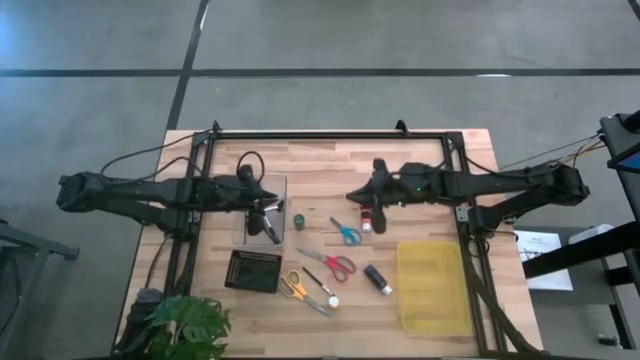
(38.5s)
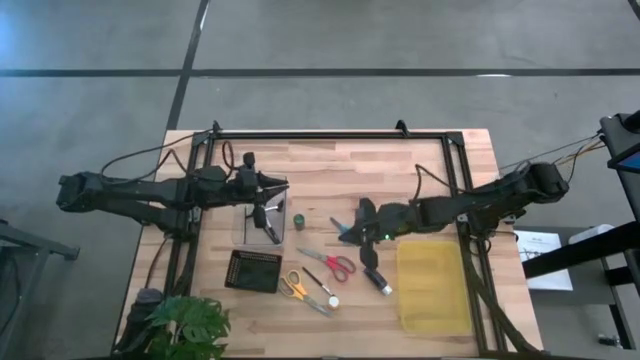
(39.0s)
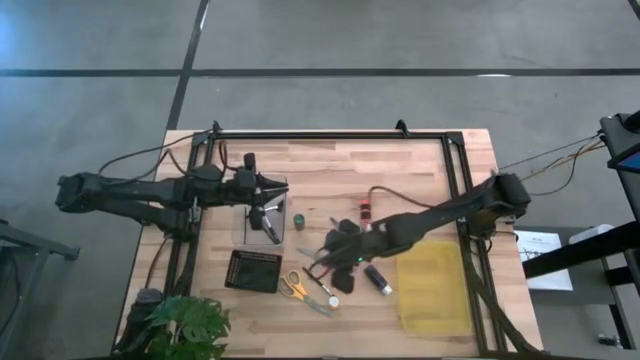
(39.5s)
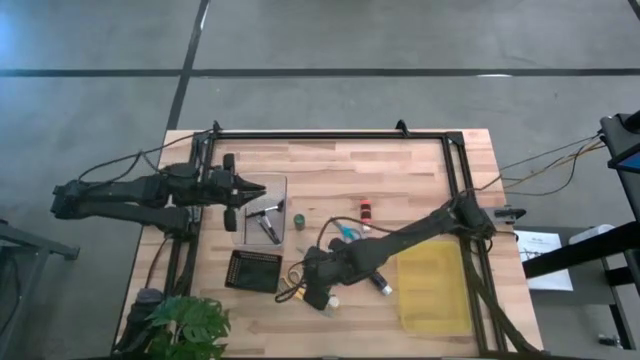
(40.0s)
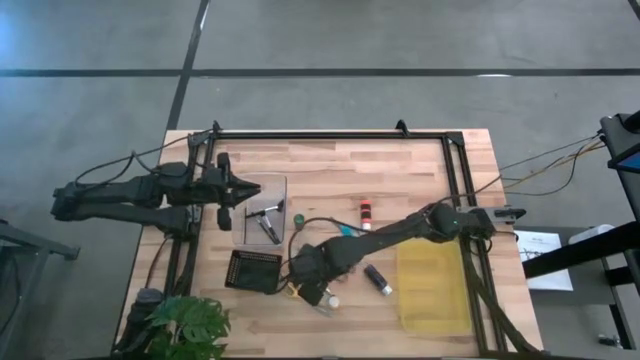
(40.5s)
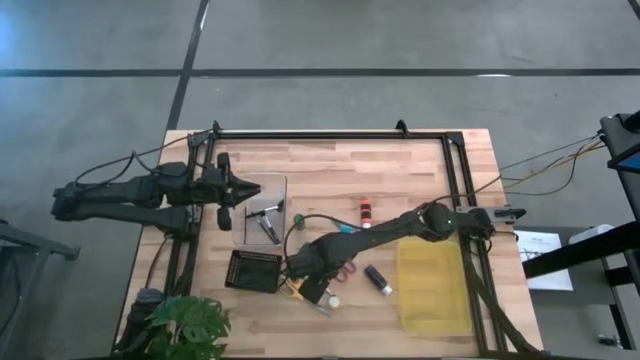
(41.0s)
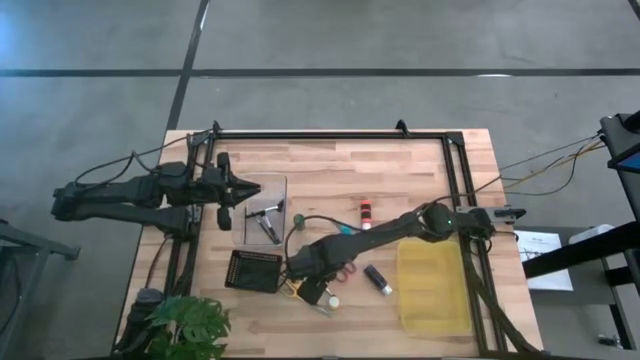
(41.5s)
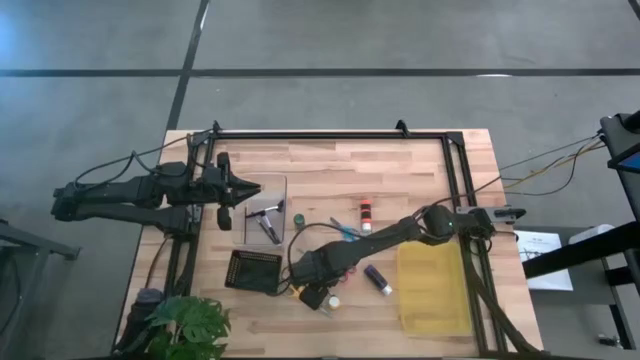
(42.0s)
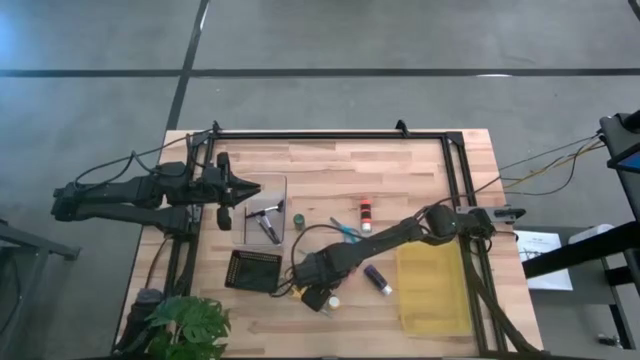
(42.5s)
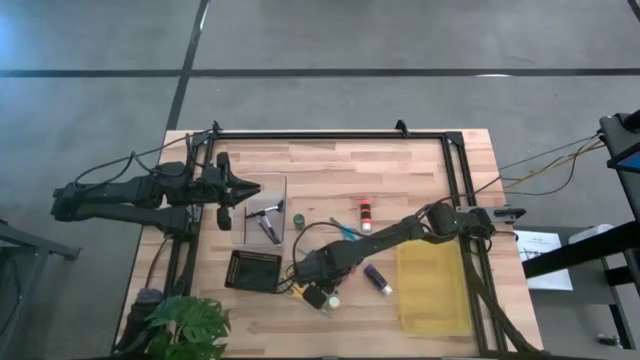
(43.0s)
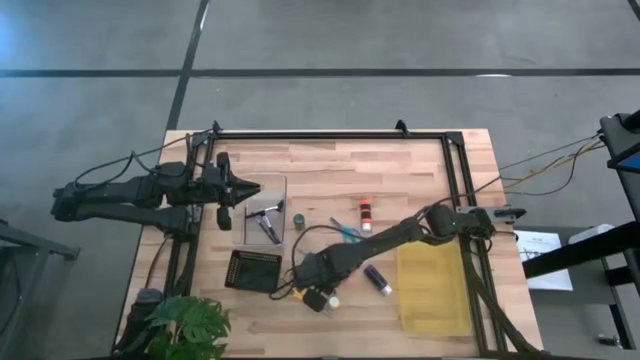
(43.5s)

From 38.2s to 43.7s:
Task: Pick & Place Paint Supplies
Put the eyeshadow brush into the transparent bin

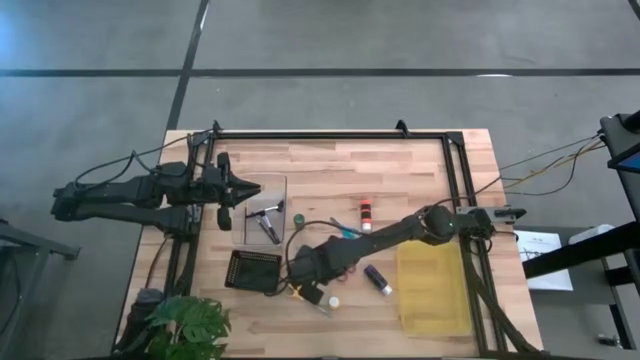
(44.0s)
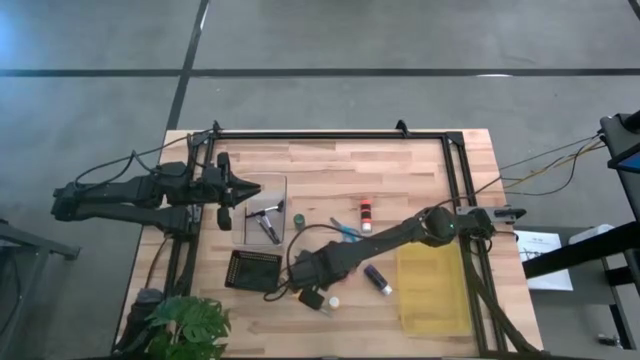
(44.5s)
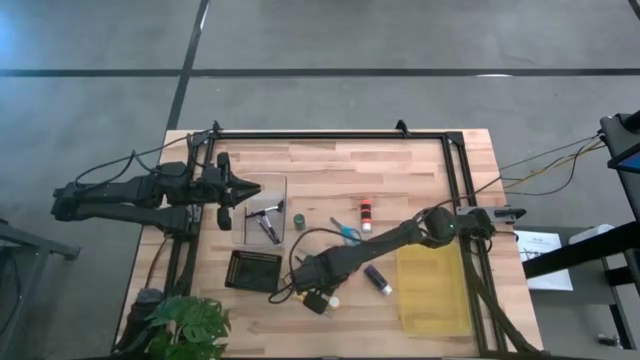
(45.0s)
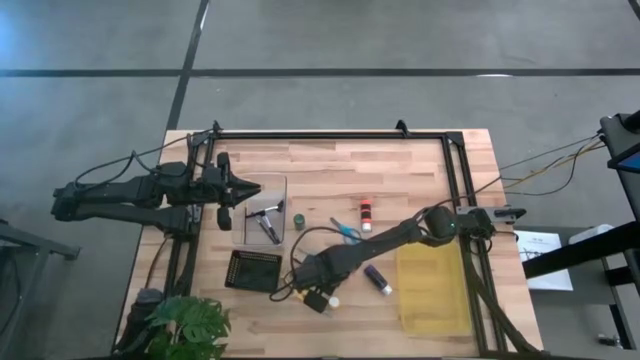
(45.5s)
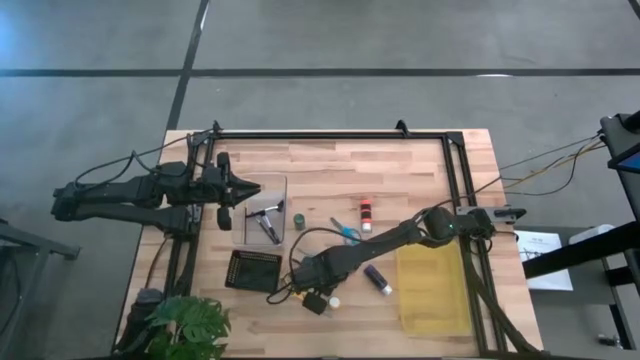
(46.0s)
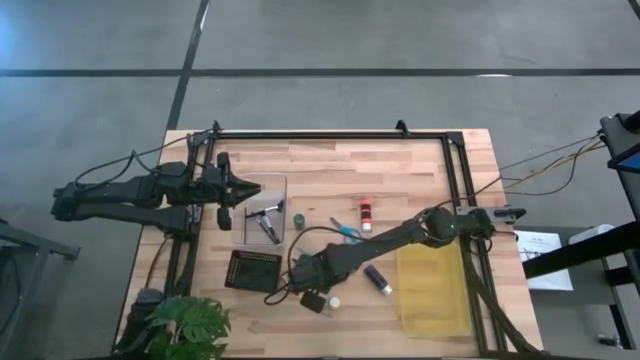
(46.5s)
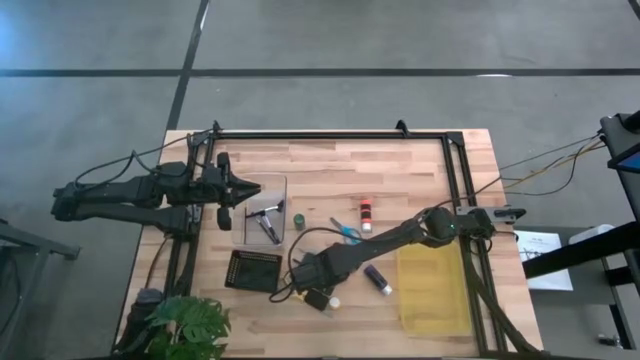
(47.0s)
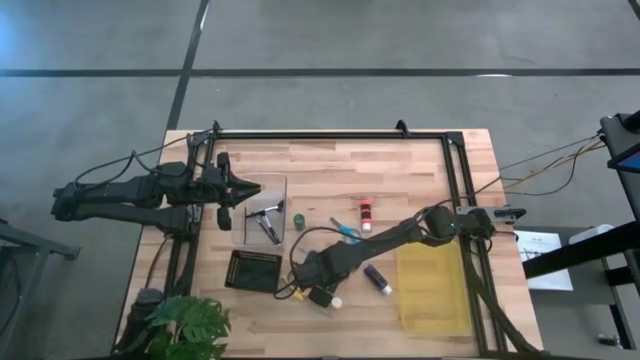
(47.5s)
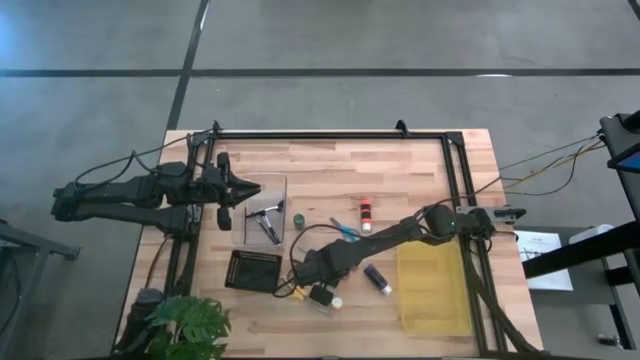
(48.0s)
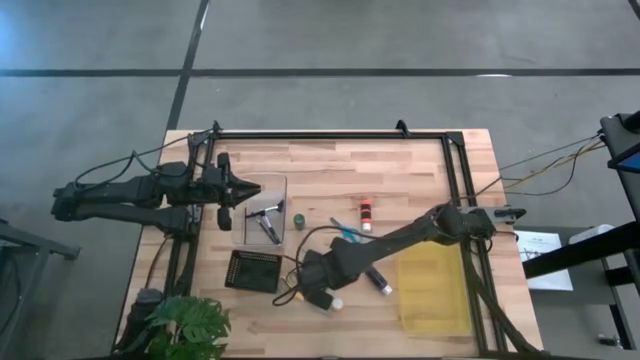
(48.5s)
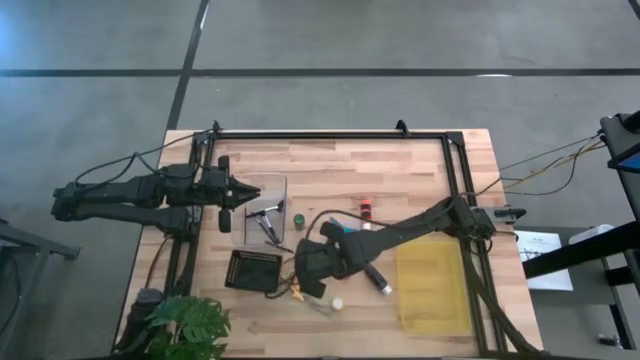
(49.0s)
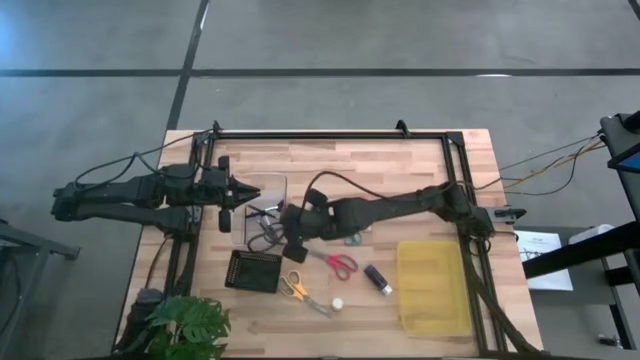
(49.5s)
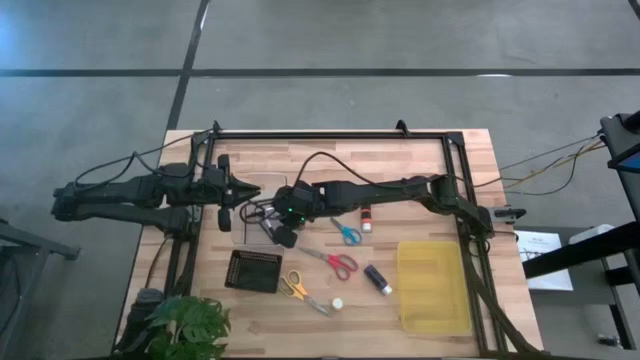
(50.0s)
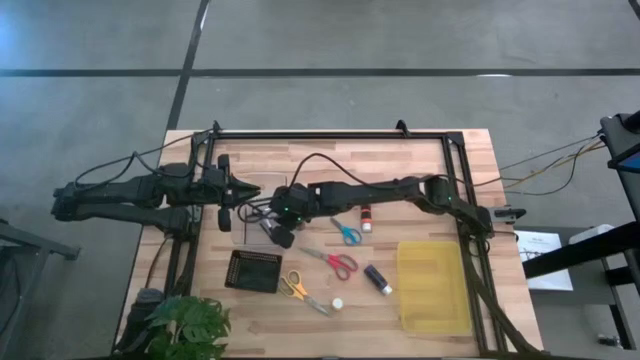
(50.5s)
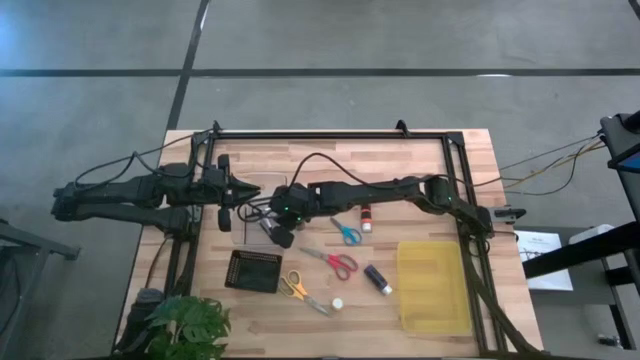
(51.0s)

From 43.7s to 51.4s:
Put the eyeshadow brush into the transparent bin

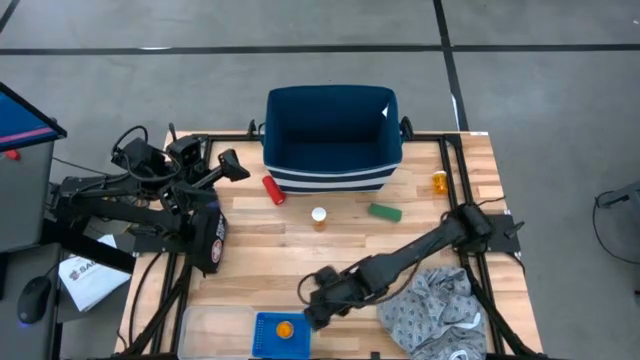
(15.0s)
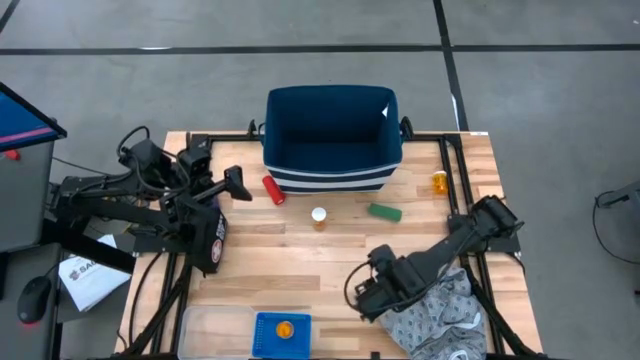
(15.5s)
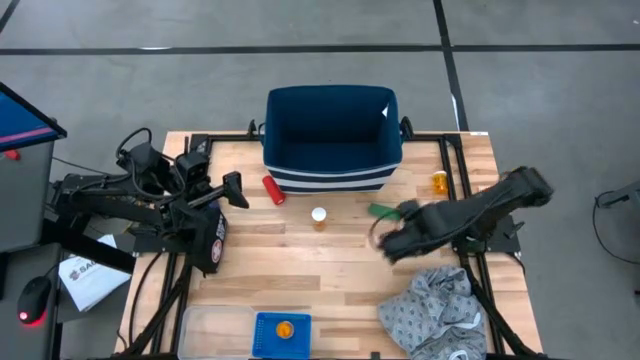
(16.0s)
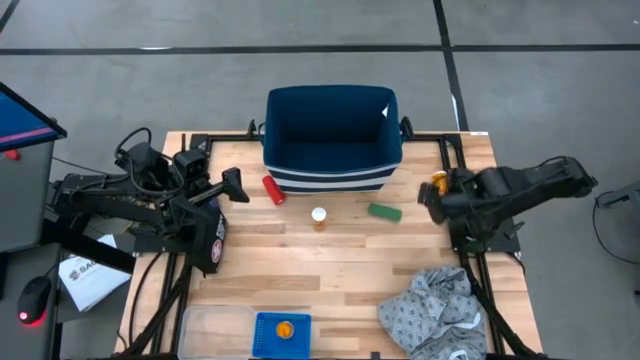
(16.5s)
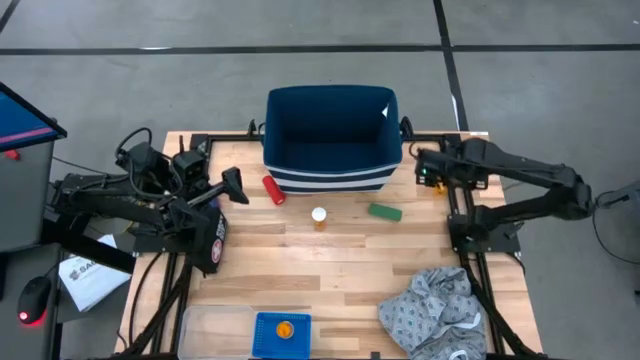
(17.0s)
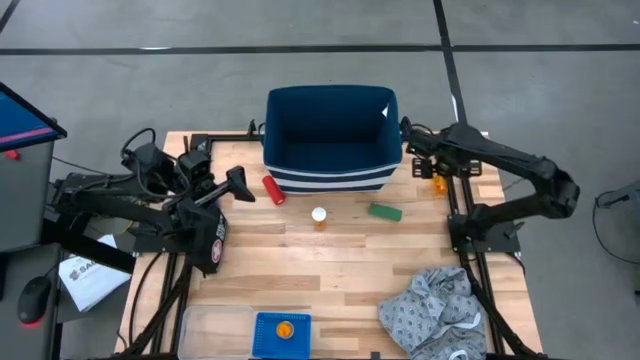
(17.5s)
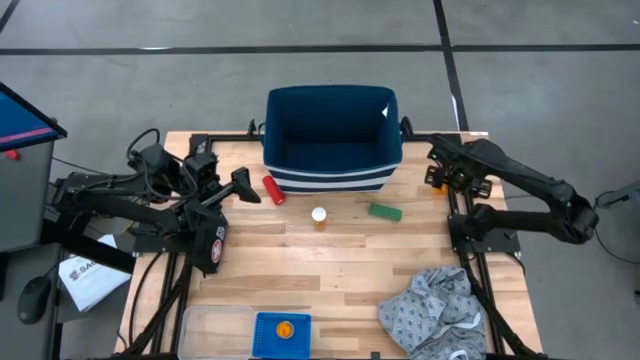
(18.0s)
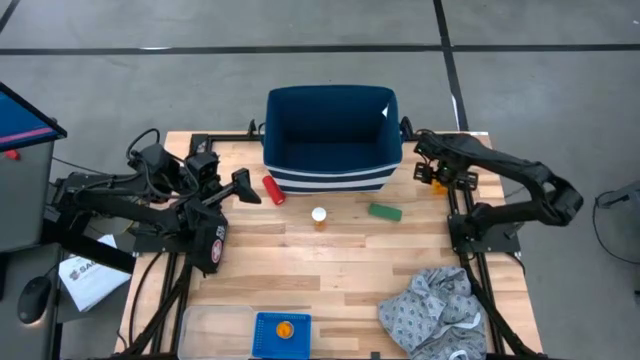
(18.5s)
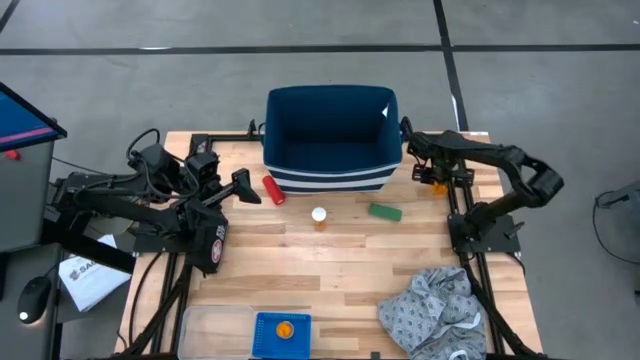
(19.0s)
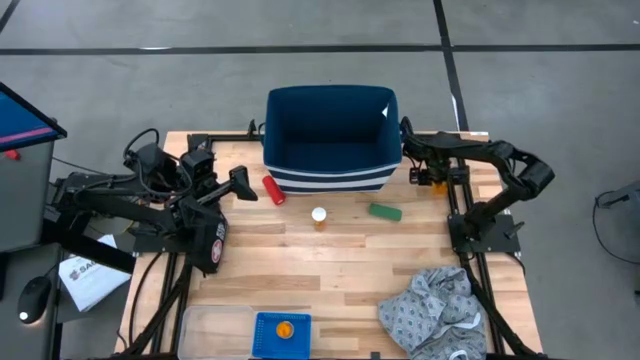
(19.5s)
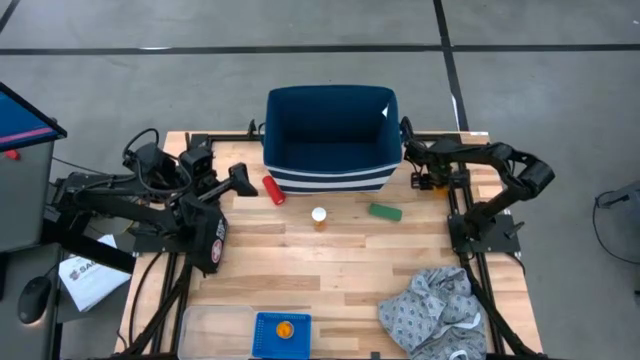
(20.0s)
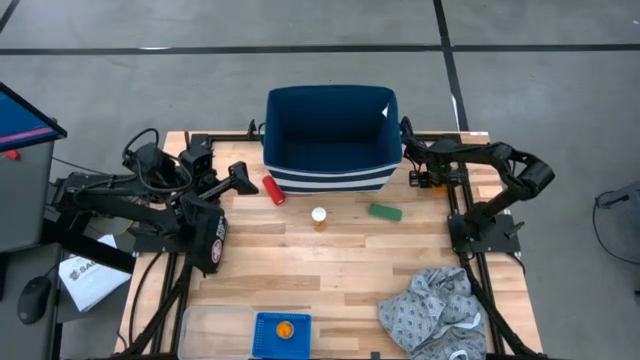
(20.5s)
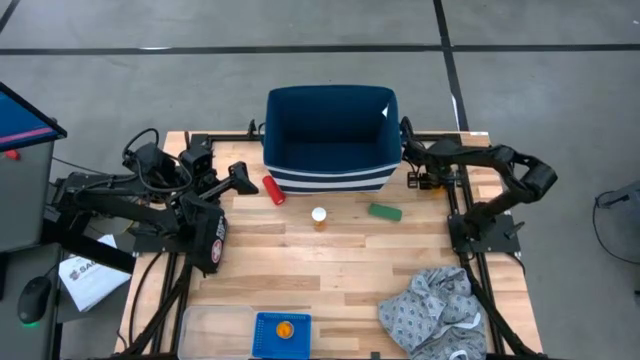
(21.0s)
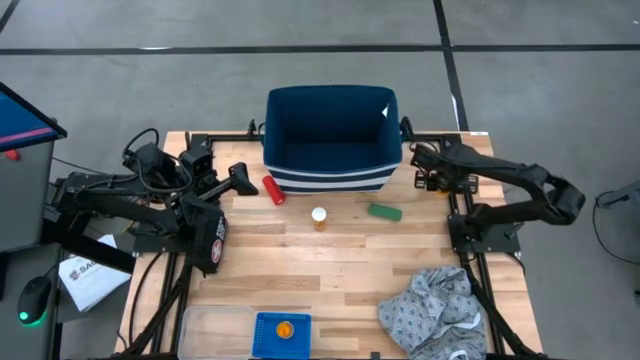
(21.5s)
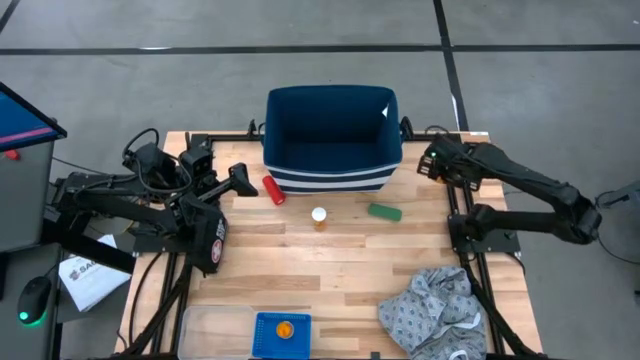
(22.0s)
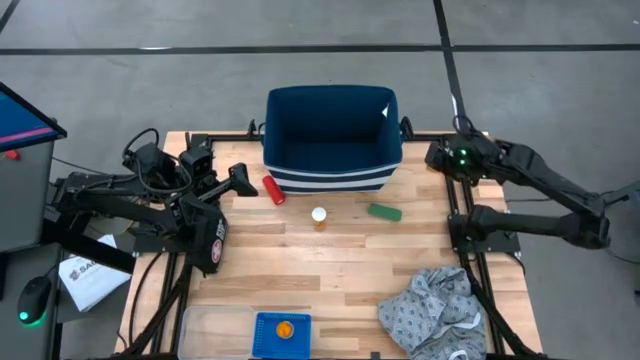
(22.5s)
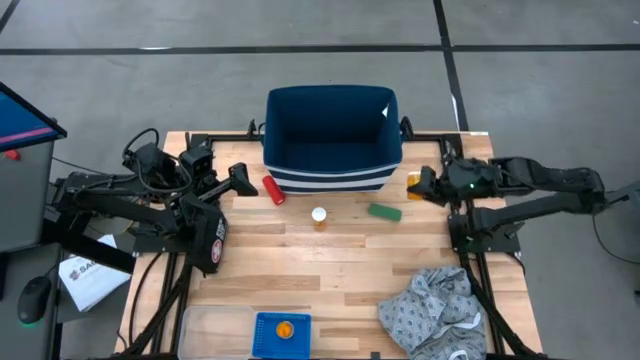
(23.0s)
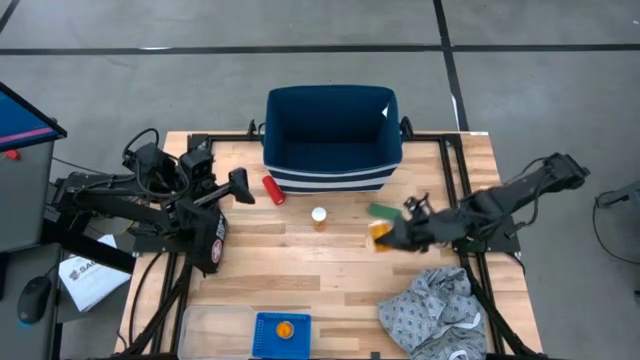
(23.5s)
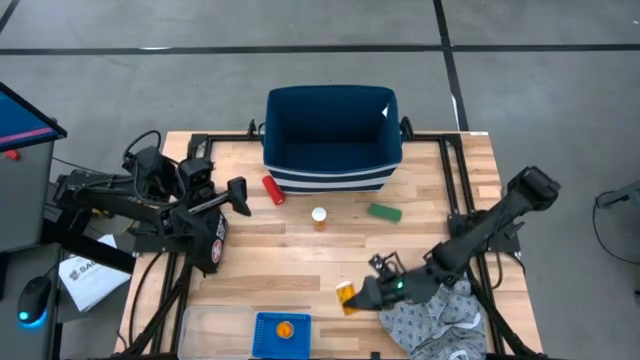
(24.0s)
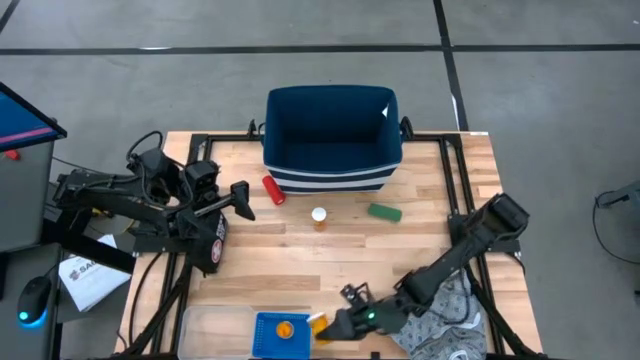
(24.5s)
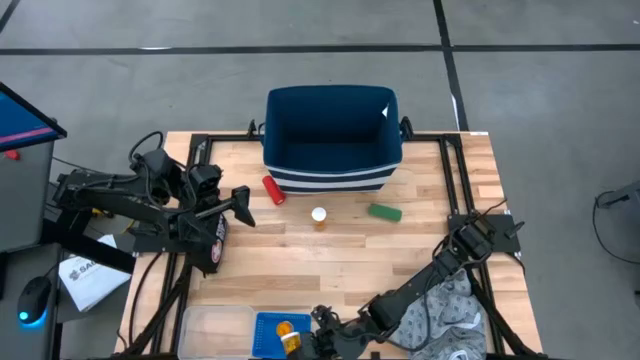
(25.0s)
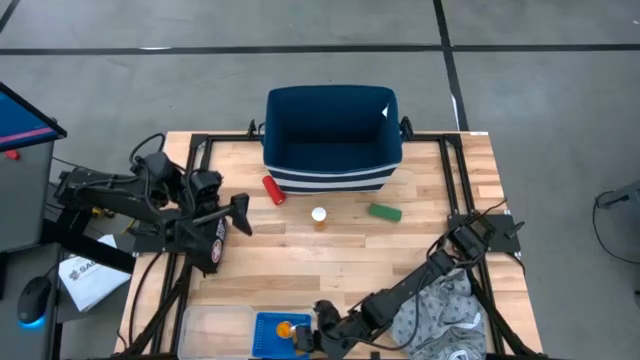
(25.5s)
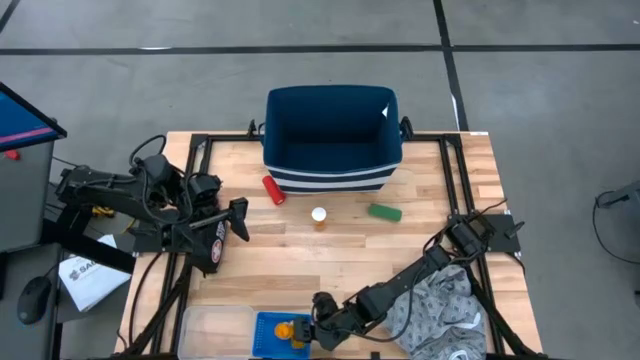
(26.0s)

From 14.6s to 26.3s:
Task: Pick & place medical supplies in basket/bin
Put the top yellow pill bottle into the blue basket
